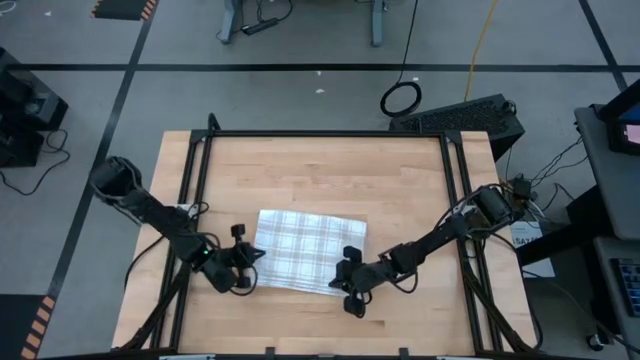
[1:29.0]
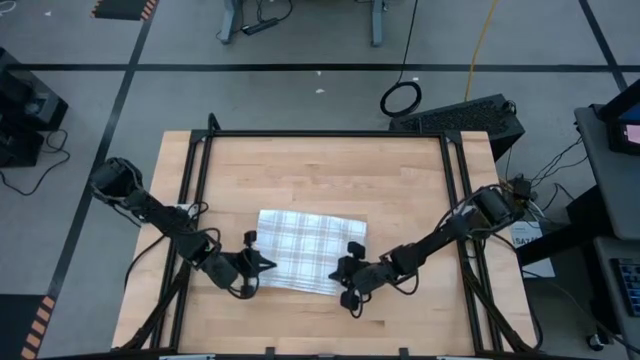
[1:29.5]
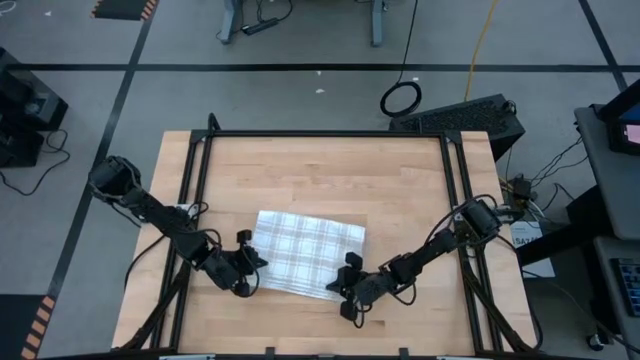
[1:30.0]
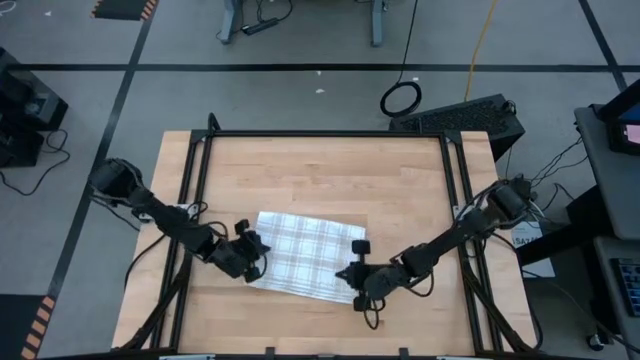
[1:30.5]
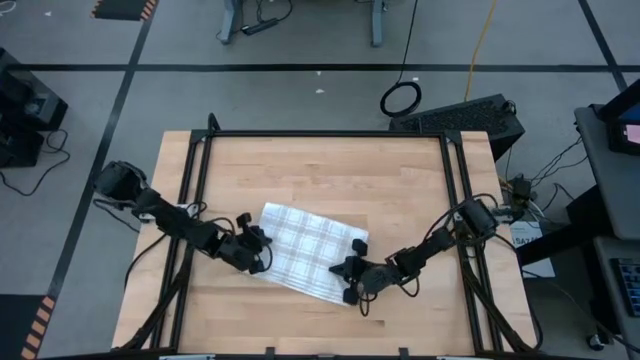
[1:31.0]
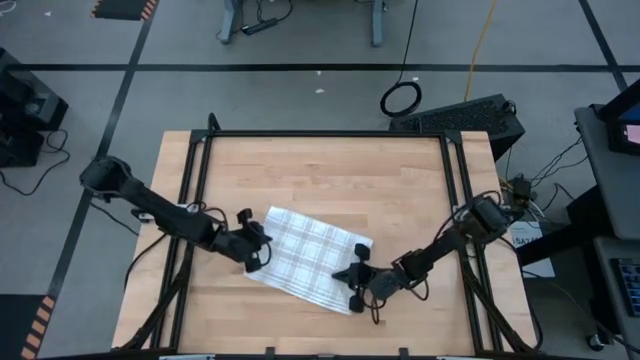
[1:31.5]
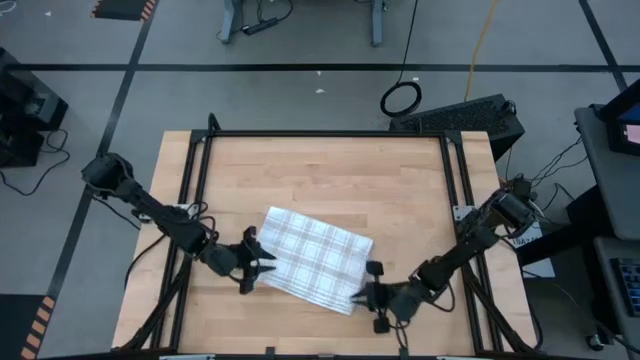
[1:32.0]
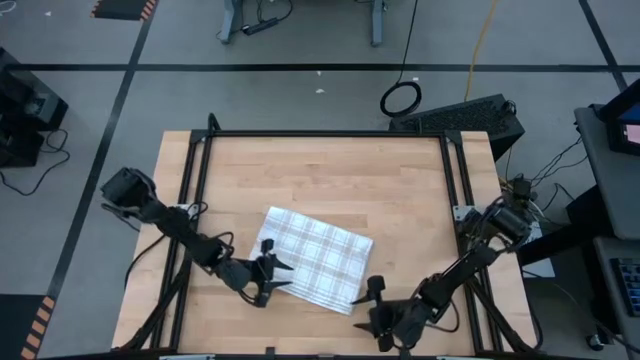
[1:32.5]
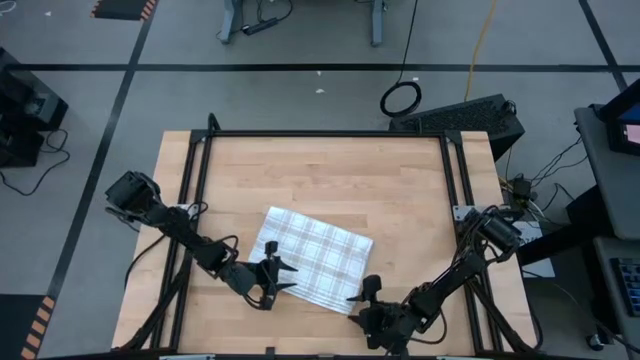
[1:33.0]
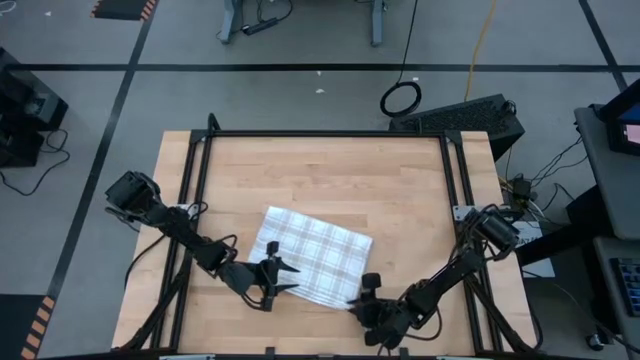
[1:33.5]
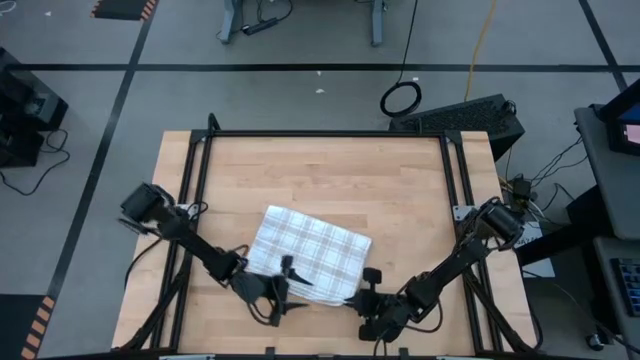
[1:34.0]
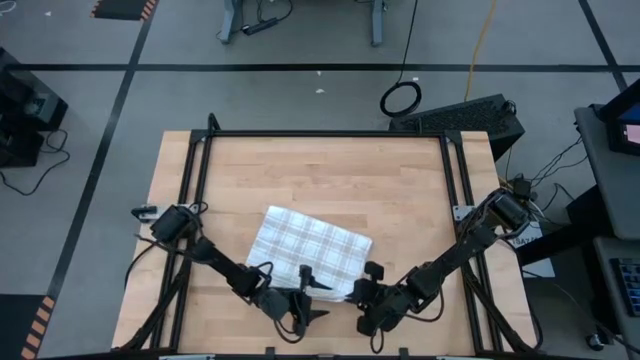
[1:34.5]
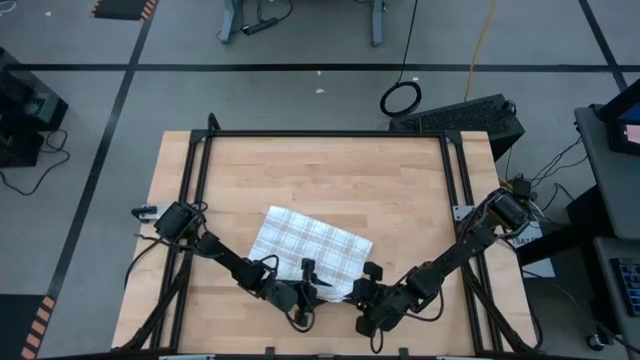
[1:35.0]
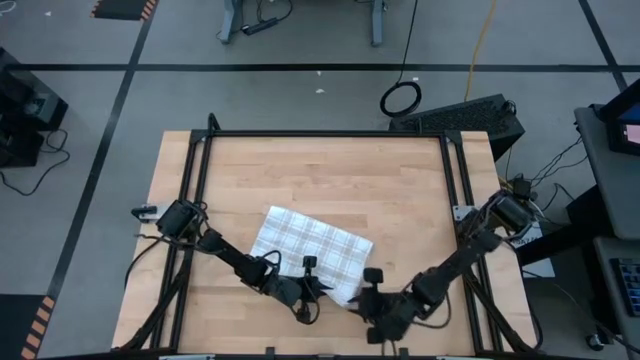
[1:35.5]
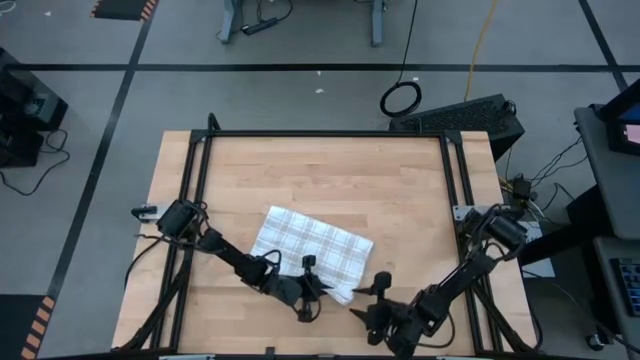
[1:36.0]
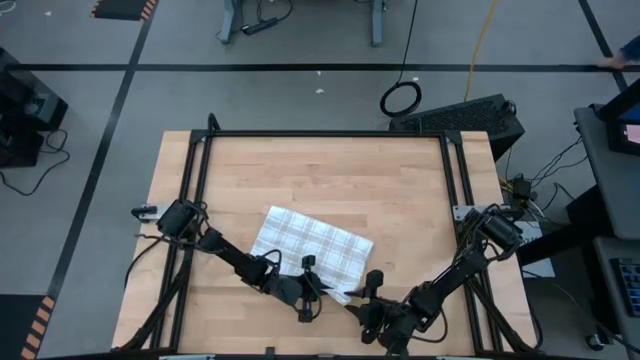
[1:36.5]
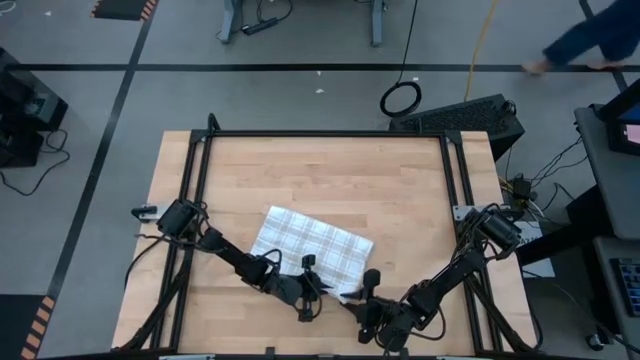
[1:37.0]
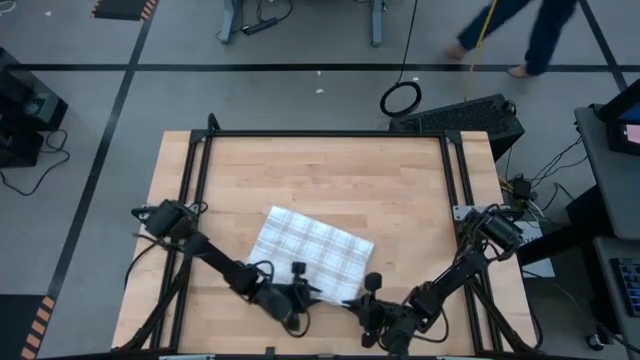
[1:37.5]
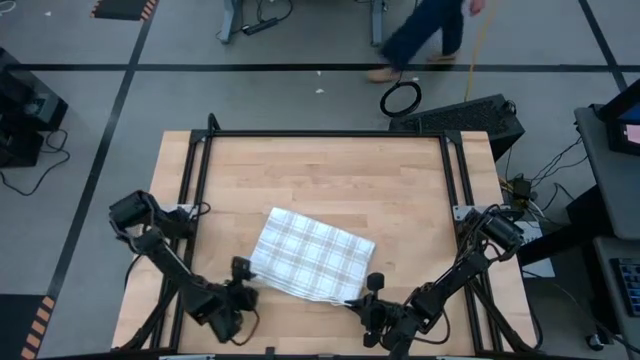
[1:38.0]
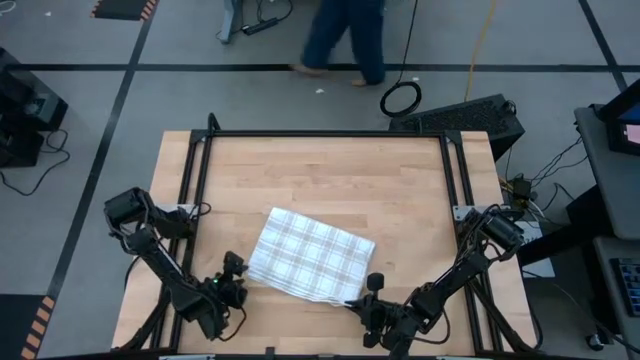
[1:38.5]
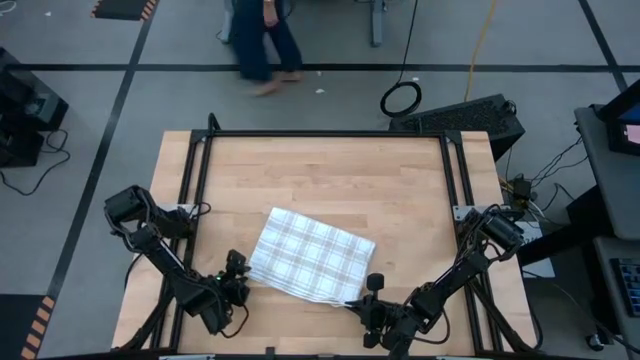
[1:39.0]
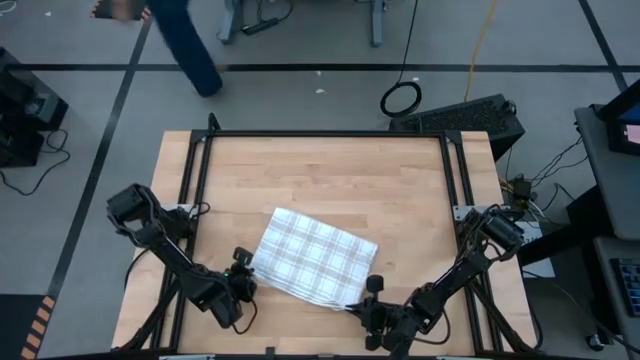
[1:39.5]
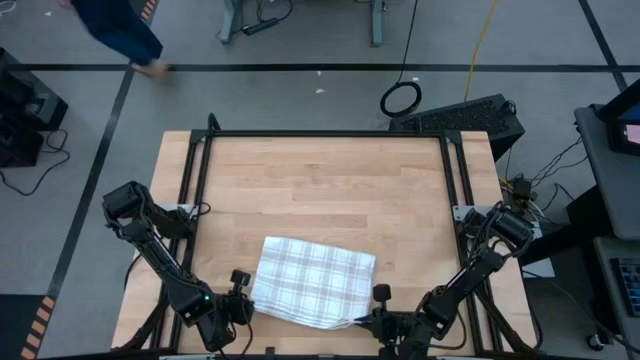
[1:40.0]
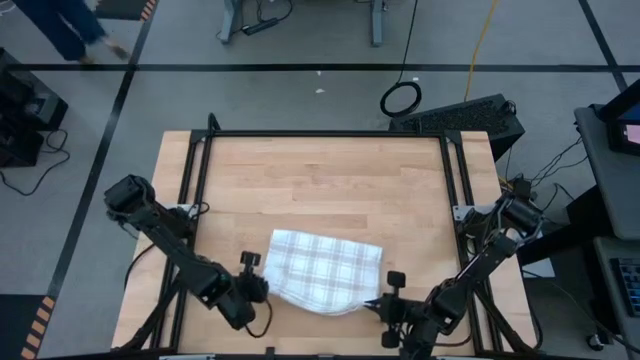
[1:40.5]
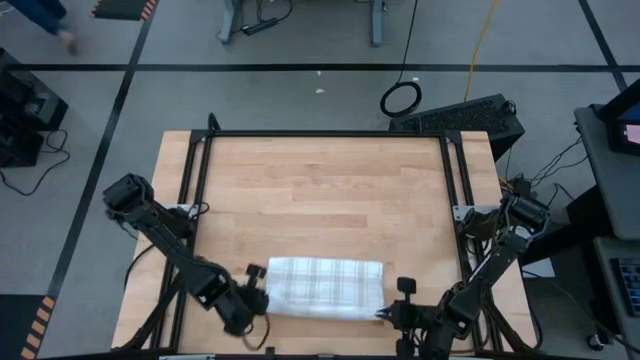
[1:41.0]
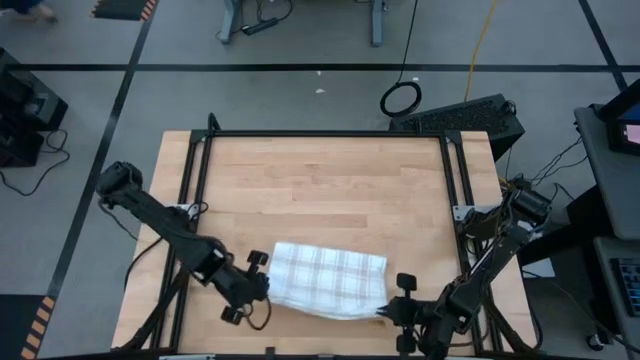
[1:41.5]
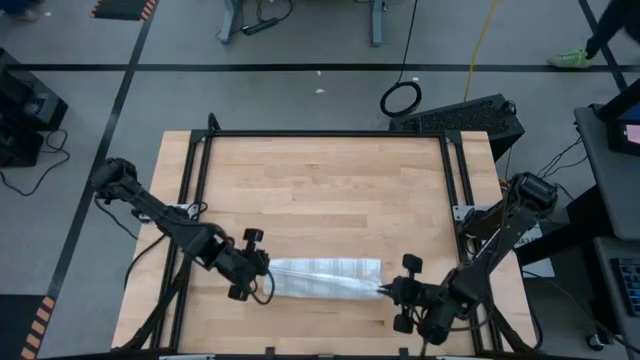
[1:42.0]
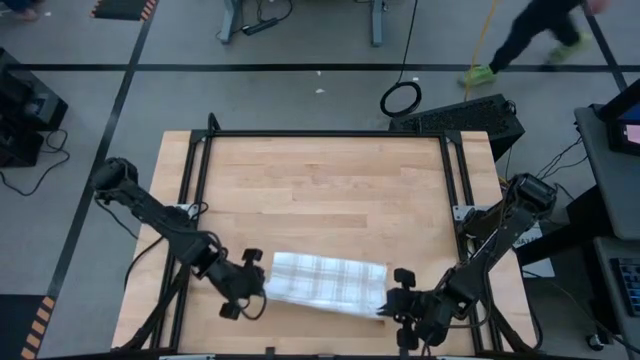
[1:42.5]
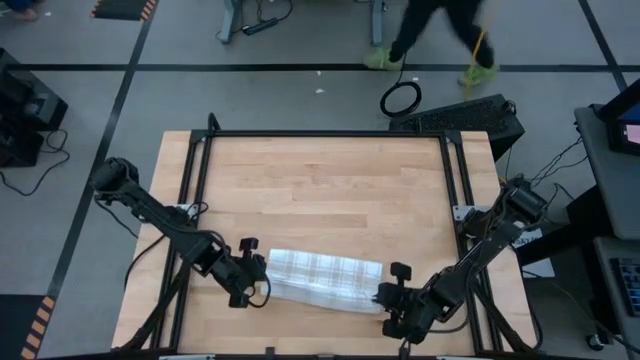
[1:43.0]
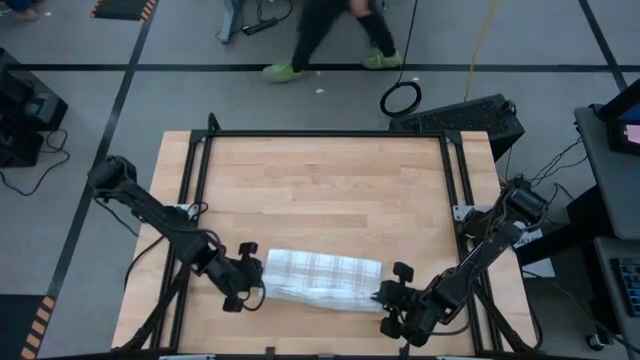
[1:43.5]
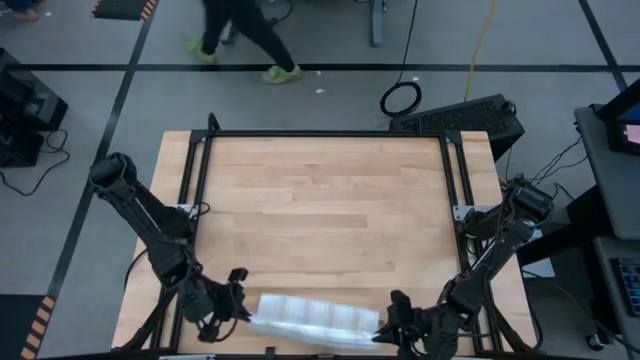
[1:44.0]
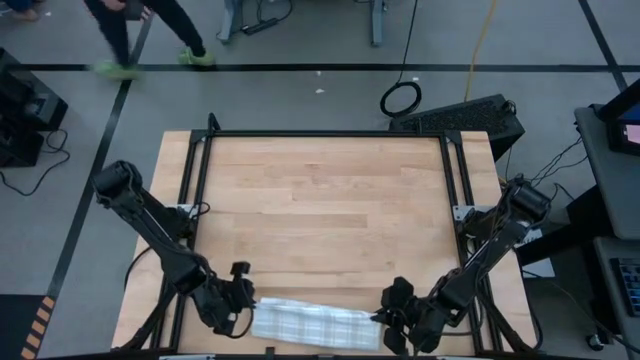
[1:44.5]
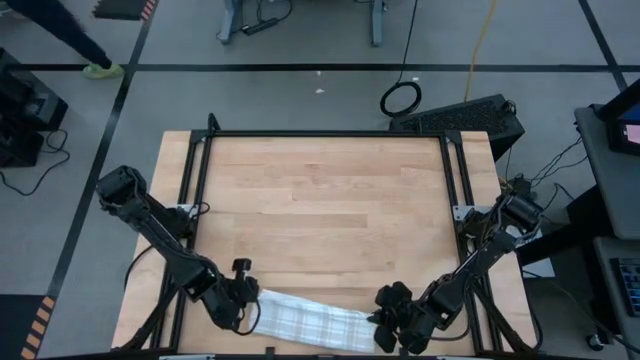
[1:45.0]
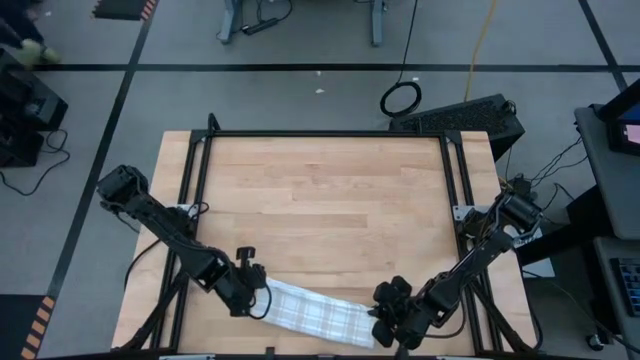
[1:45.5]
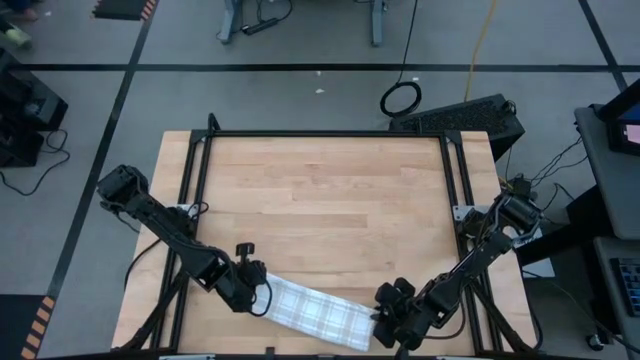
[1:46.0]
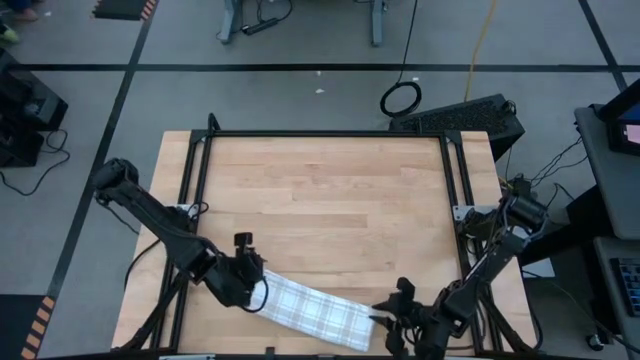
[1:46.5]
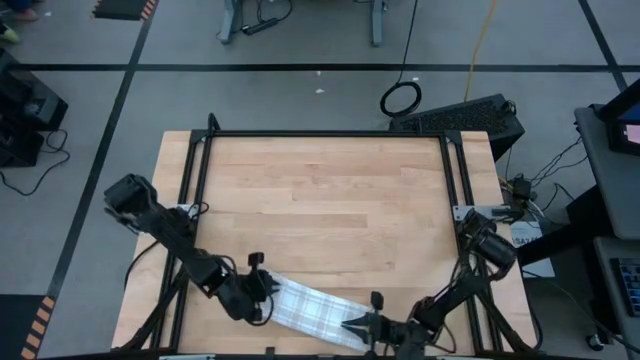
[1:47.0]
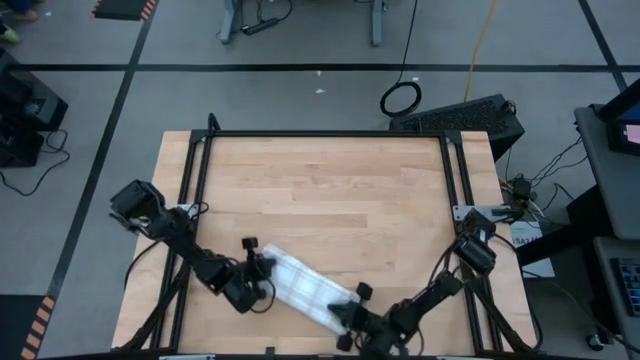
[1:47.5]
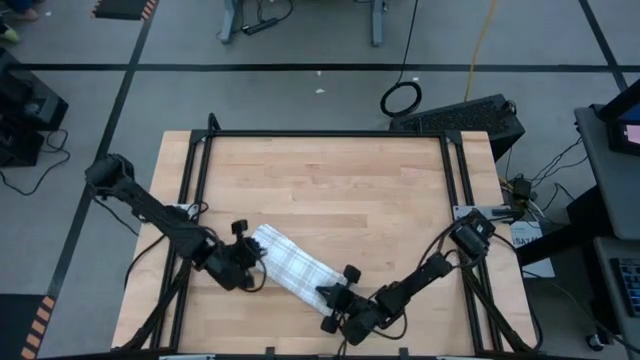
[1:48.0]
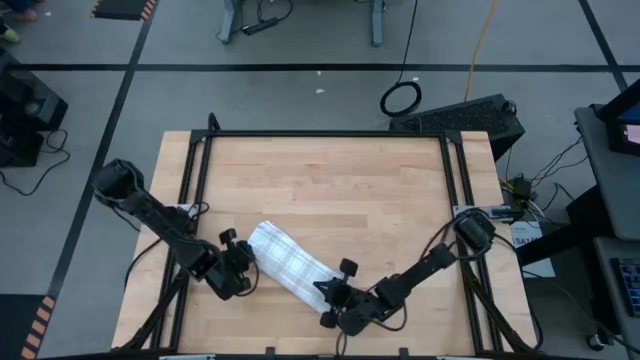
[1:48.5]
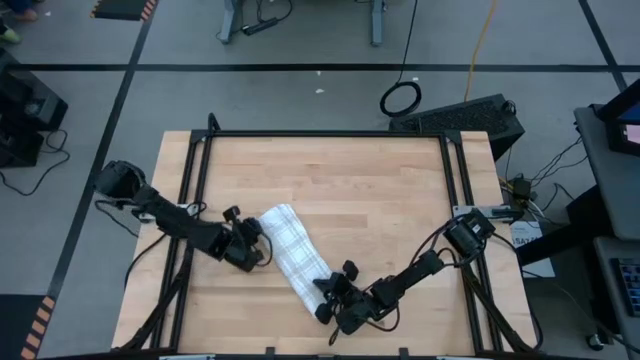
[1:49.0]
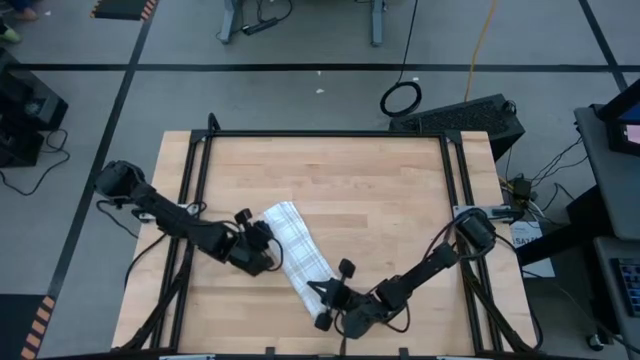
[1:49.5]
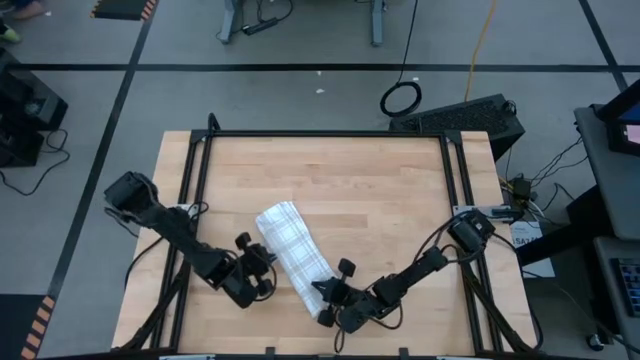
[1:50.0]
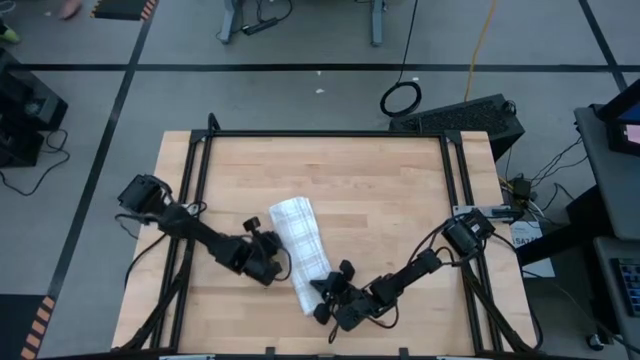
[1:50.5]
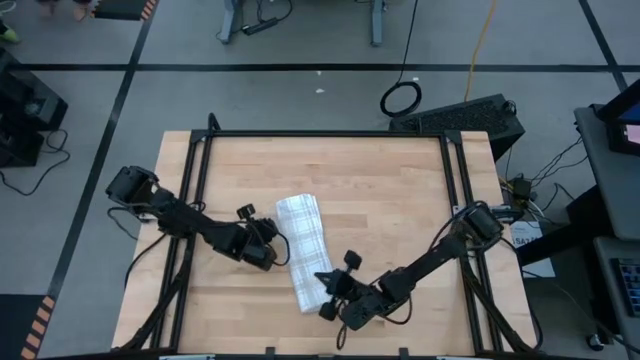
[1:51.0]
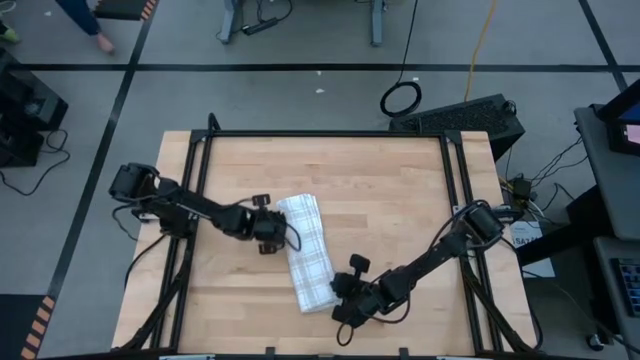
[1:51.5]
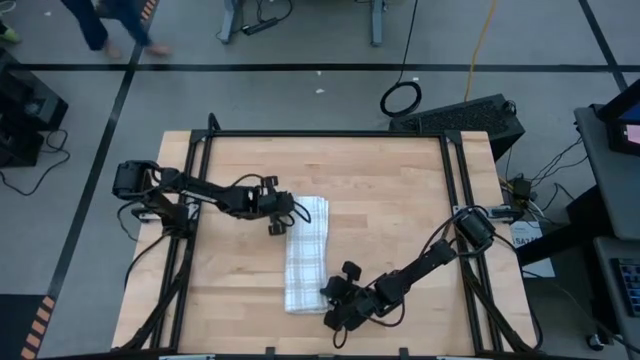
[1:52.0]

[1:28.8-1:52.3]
Task: Roll towel
Fold the brown checkered towel
